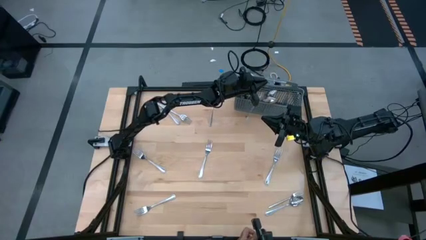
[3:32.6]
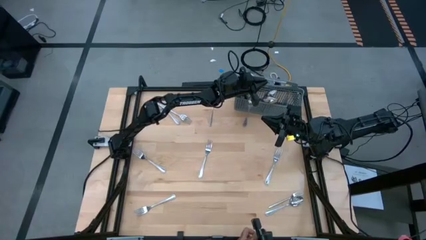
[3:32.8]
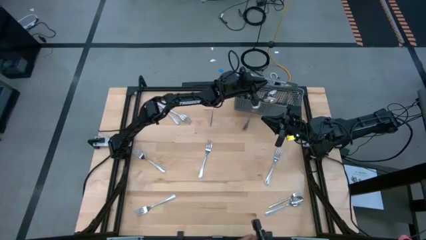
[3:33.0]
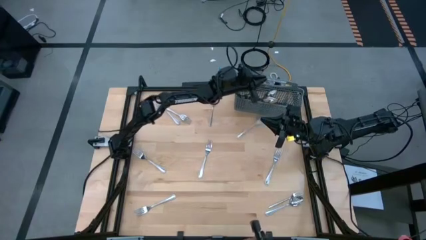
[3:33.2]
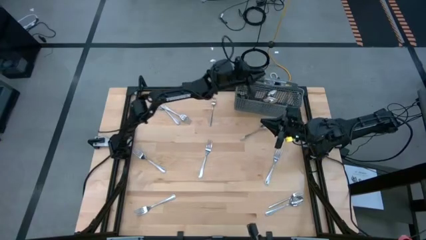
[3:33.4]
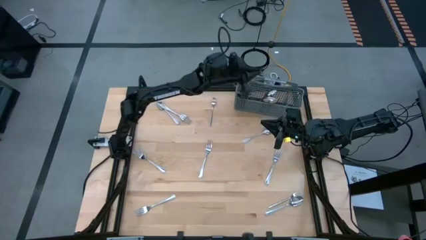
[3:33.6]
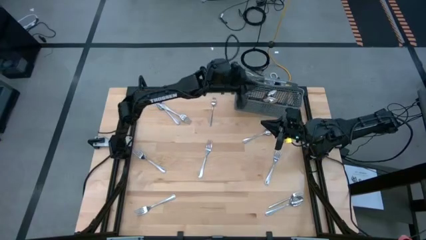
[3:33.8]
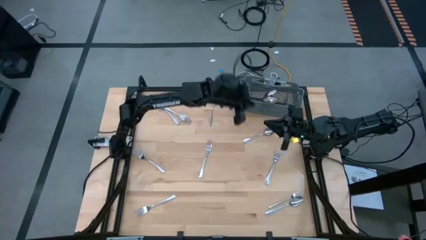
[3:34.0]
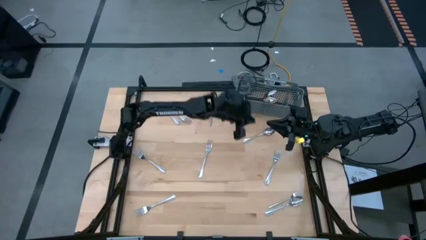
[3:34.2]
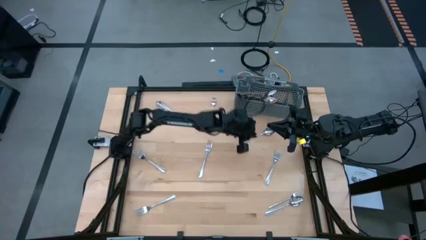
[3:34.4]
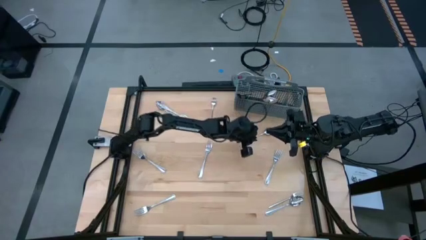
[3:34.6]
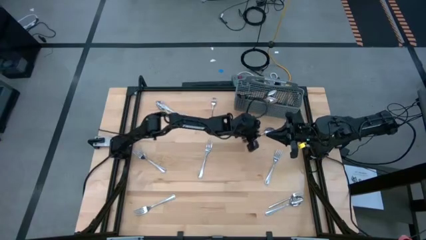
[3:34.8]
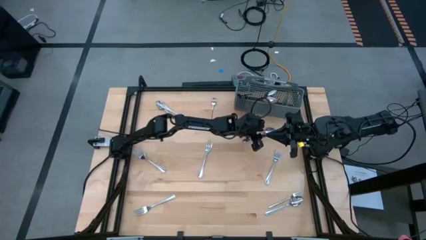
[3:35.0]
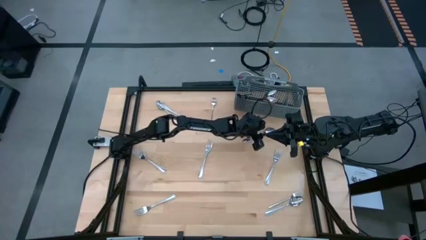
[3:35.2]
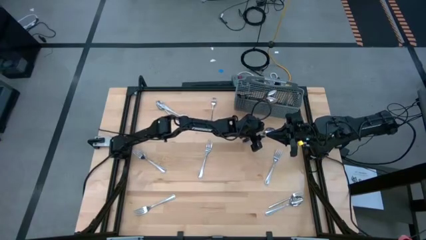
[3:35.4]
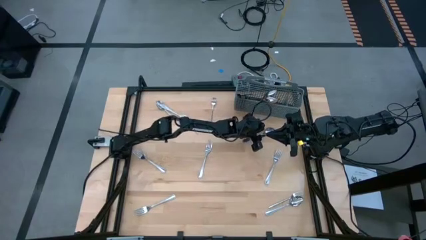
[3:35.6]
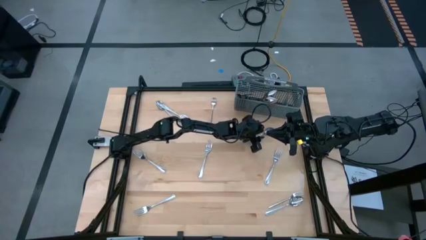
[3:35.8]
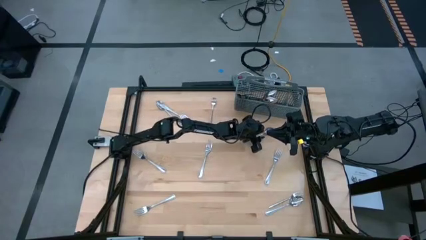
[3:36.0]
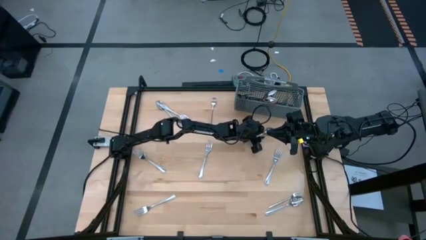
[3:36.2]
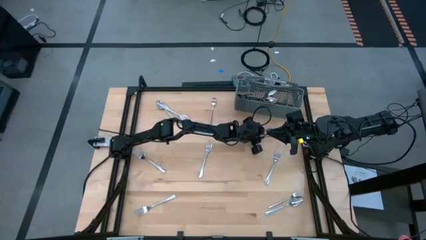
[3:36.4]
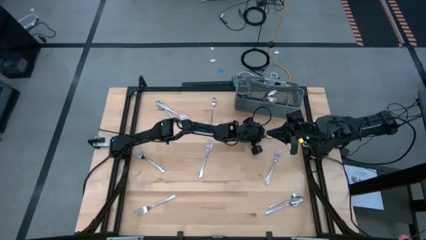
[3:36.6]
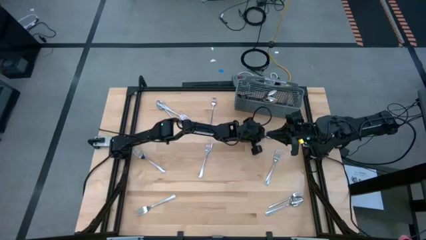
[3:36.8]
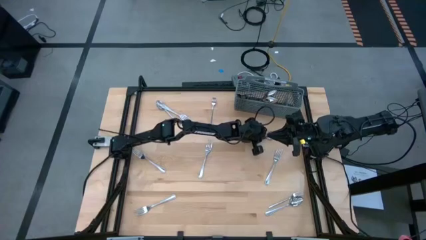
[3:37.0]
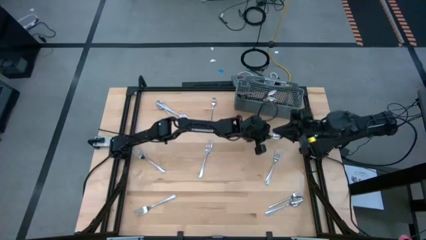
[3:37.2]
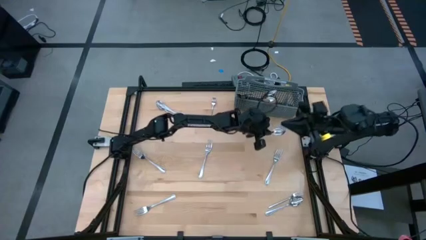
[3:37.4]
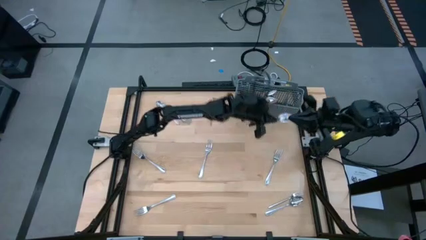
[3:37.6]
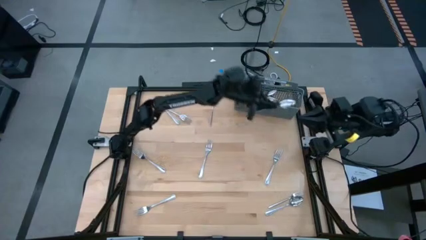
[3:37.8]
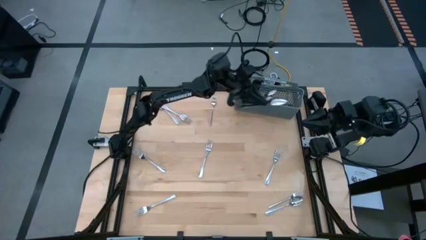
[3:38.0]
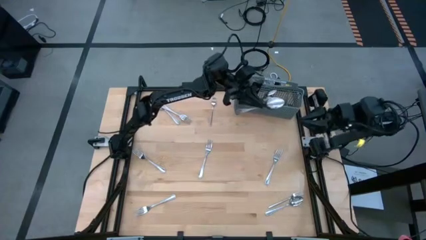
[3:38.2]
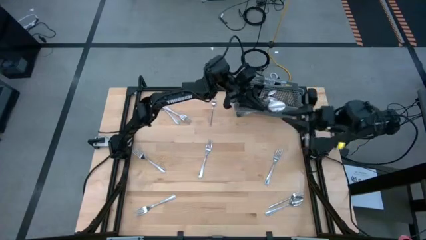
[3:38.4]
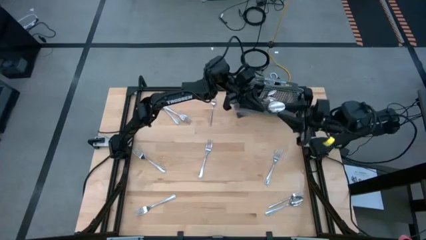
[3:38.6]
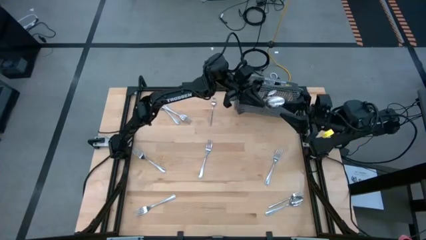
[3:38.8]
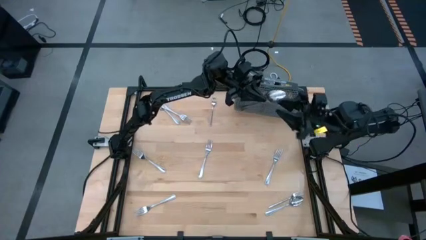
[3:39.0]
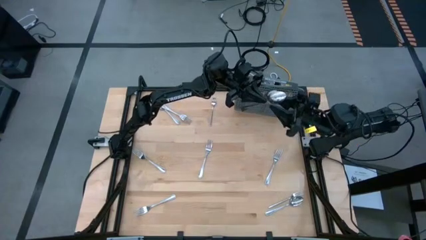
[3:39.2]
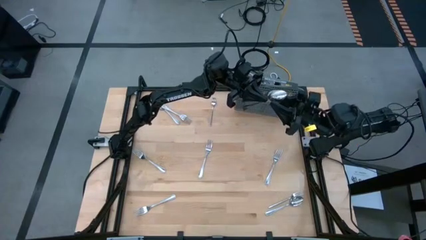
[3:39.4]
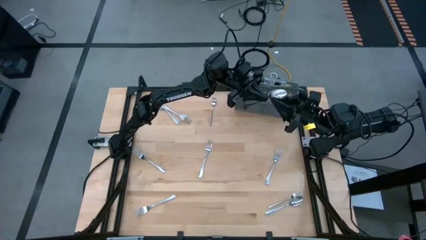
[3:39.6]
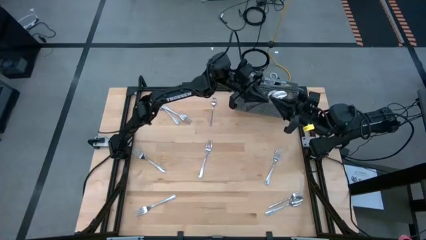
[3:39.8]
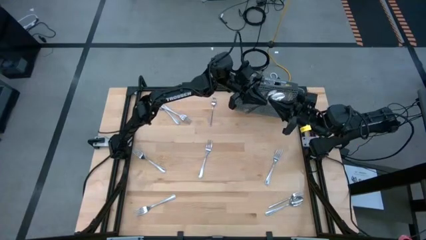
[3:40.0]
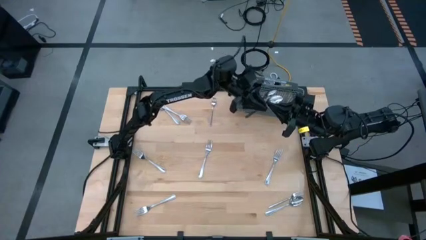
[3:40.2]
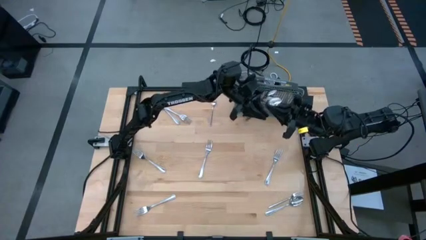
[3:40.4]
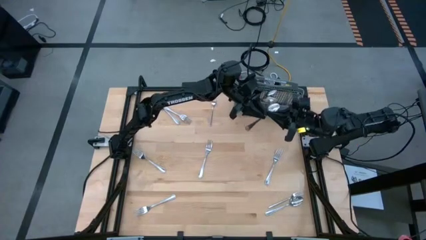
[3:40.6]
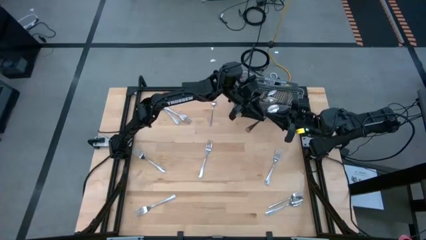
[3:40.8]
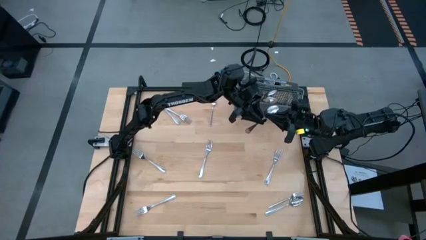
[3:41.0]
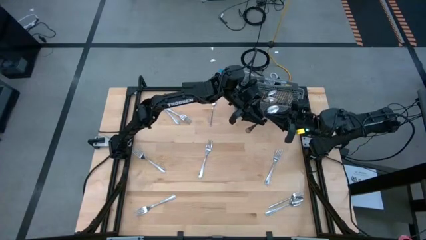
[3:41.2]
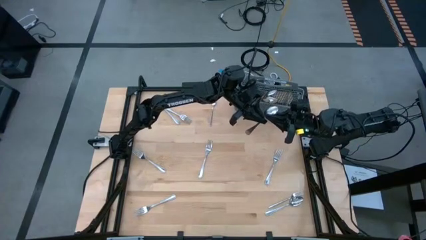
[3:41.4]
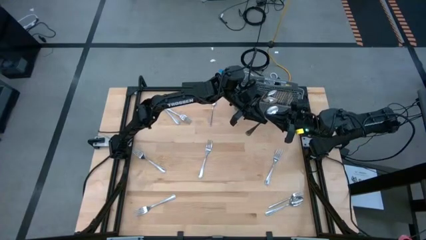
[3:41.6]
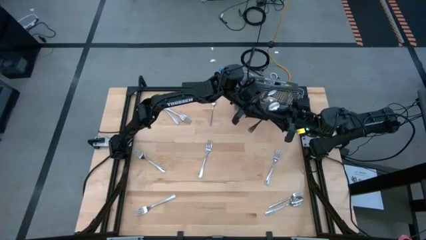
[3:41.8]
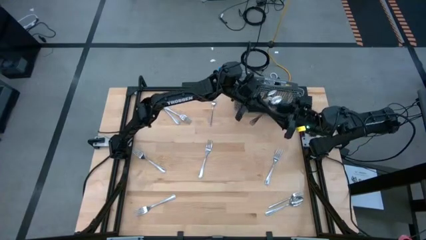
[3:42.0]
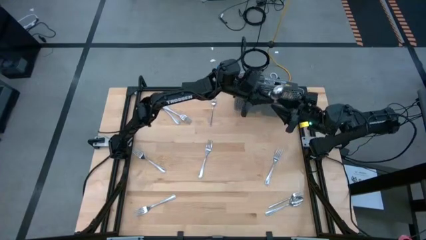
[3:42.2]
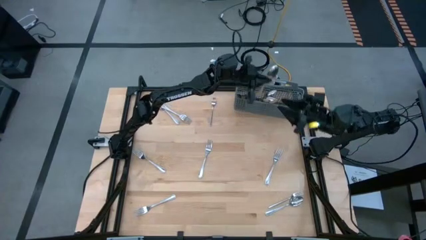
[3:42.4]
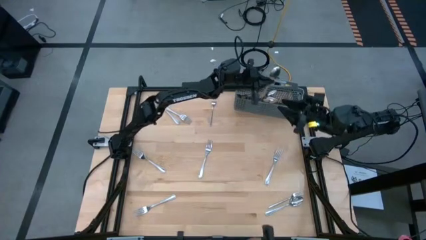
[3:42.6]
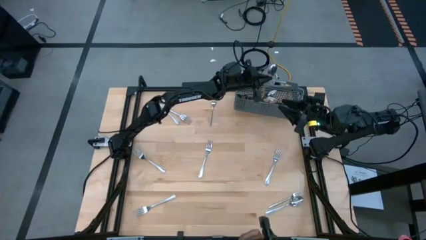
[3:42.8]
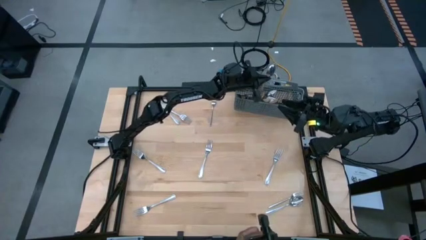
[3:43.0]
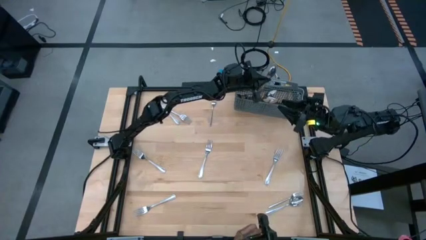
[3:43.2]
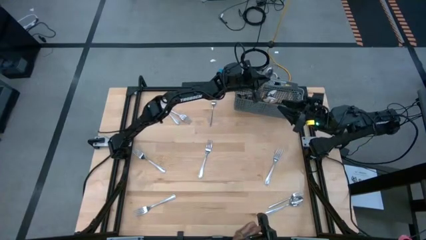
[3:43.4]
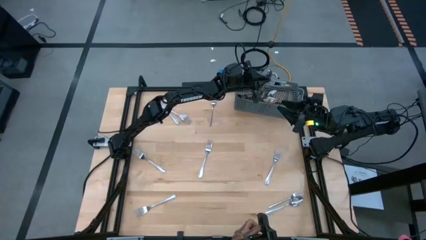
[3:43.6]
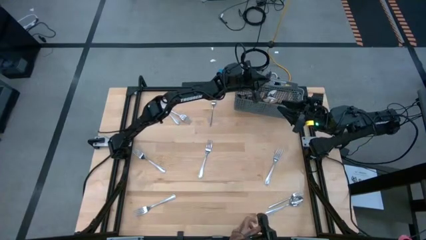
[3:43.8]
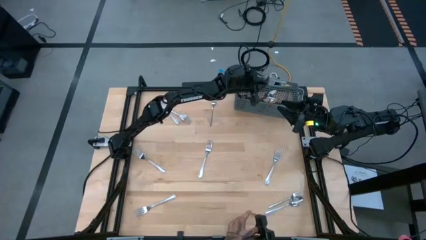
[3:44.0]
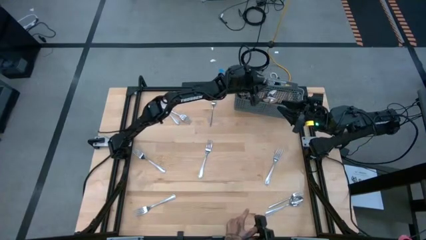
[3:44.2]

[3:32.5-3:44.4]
Task: Sort silverware
Put the silver spoon into the silverware basket

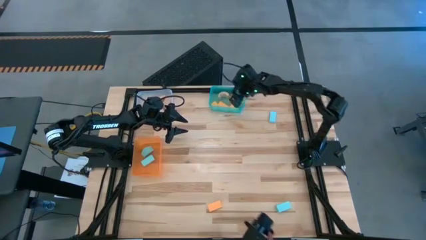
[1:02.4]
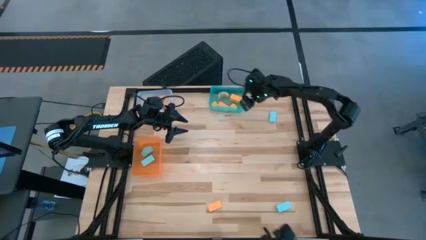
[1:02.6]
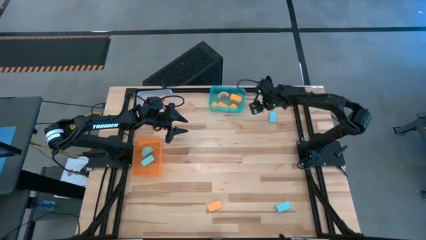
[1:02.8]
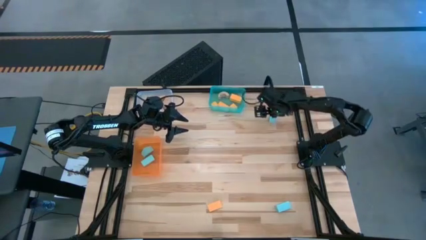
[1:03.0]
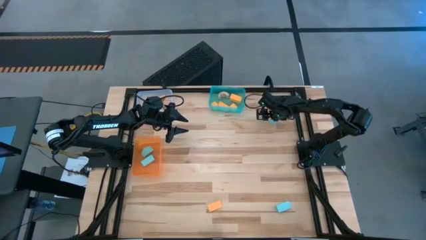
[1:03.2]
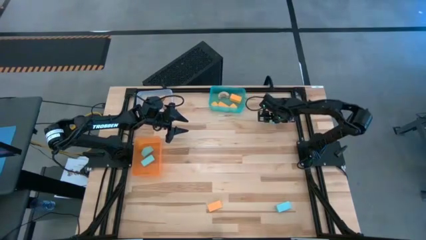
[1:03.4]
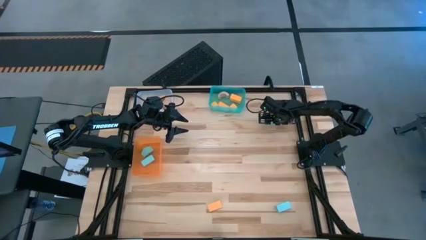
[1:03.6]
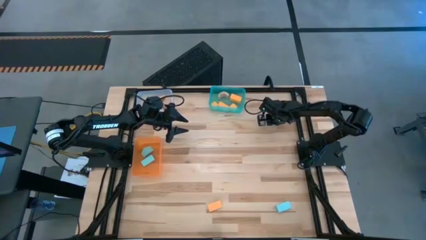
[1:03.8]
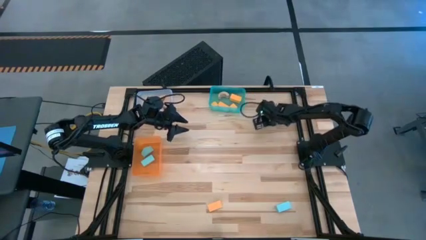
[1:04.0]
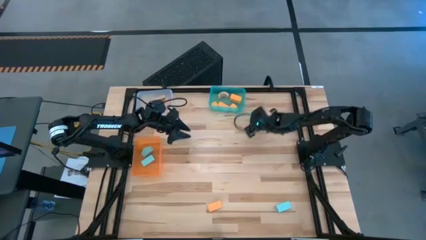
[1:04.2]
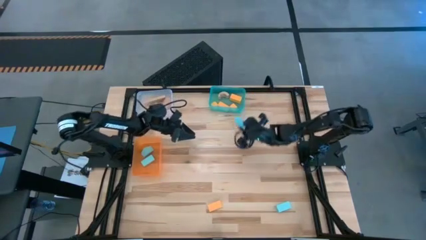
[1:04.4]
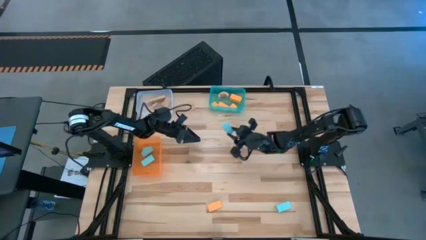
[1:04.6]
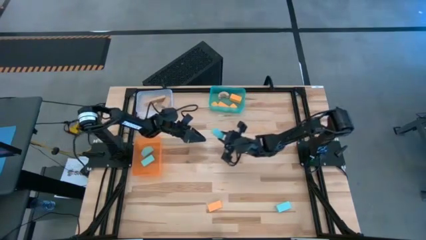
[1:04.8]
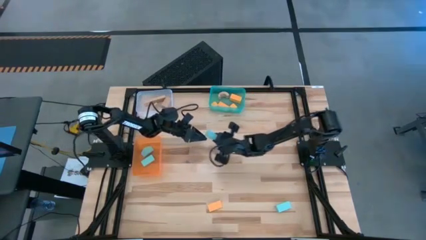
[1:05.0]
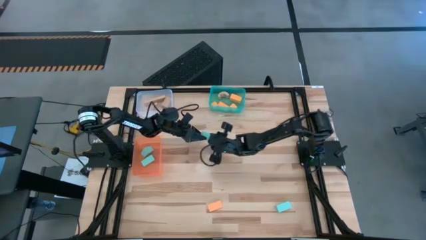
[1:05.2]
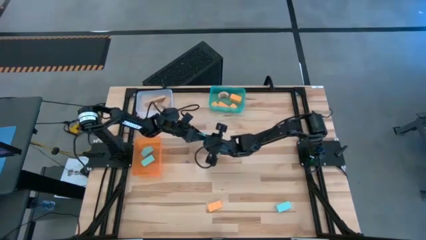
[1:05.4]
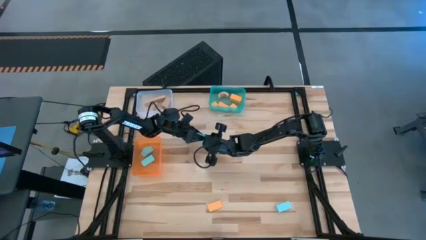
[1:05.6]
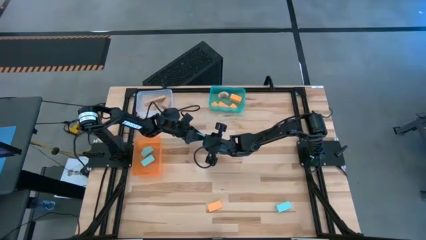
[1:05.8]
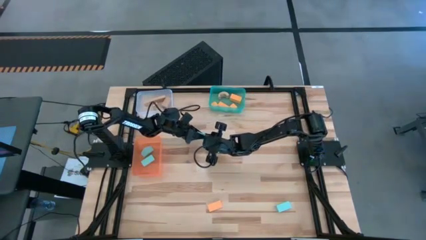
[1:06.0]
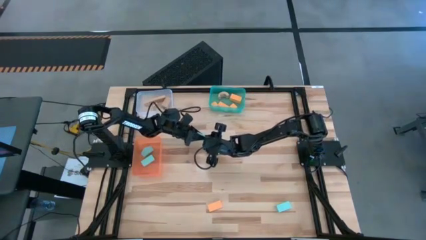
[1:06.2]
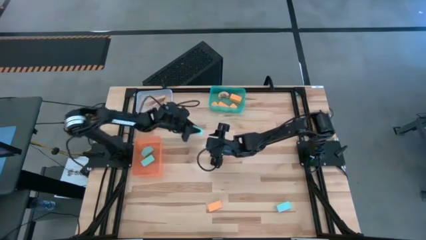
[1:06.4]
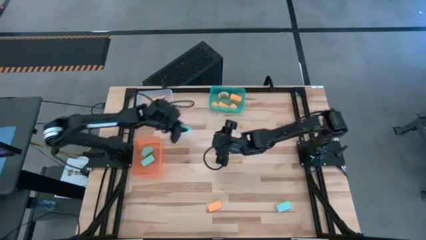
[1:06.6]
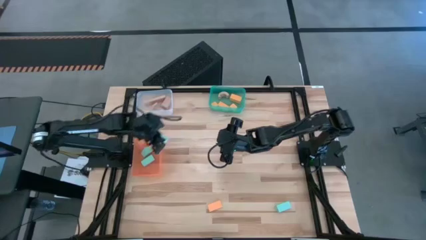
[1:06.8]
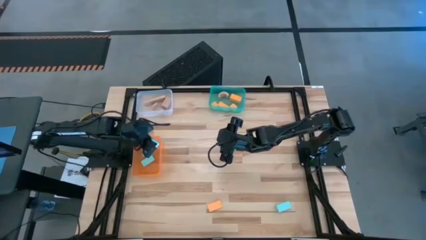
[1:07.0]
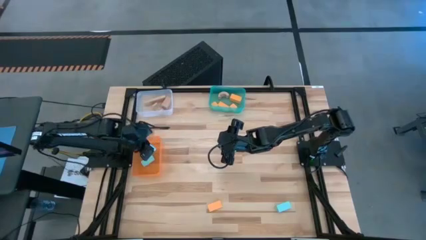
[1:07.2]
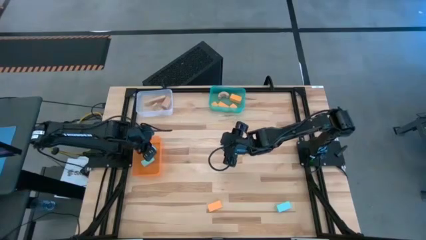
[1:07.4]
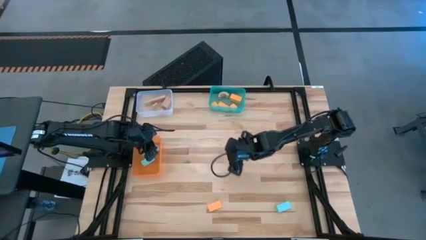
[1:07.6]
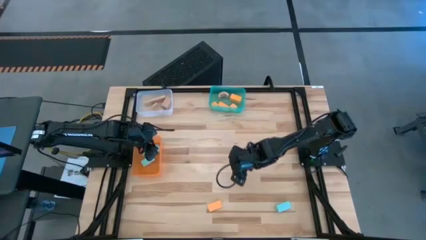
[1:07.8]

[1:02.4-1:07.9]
Task: Sort & place blocks by color
Put the blue block into the orange bin
